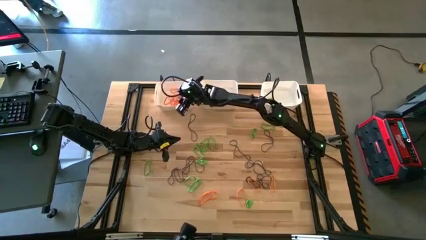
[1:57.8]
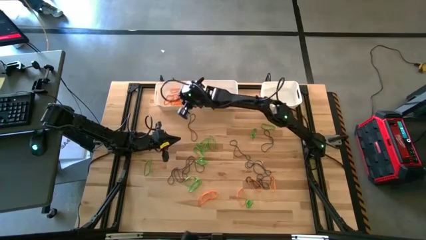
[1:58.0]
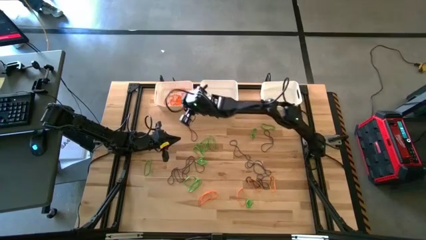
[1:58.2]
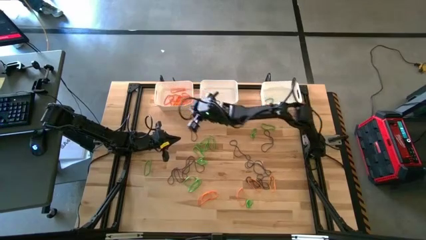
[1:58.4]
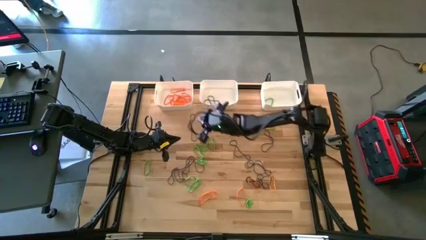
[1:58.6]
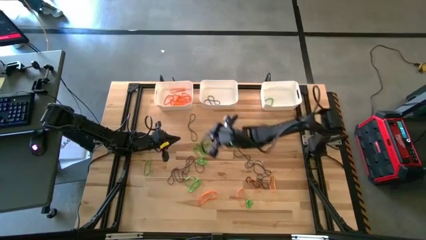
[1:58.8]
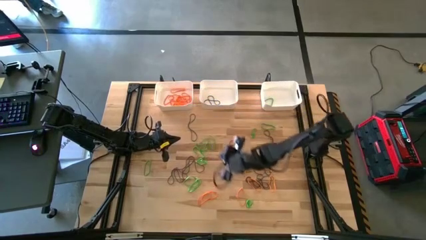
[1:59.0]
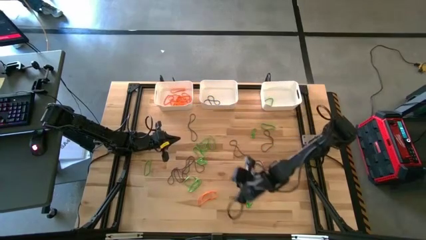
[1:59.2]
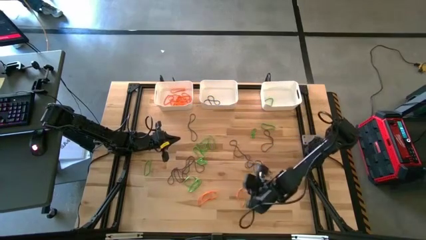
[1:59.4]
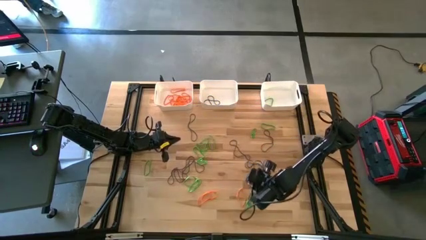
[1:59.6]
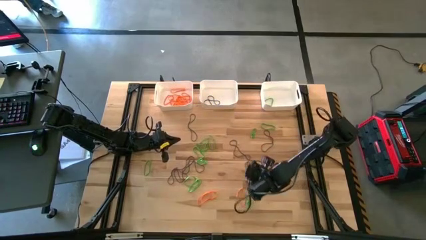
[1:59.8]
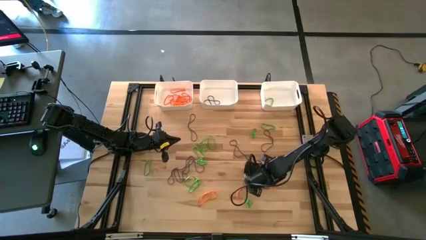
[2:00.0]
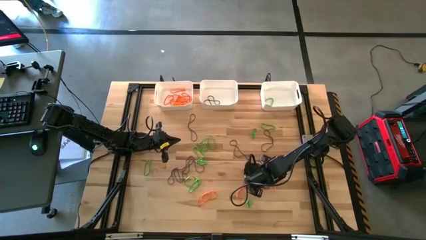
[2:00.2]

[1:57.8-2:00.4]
Task: Sort rubber bands into baskets
Put the orange rubber band into the left white bin

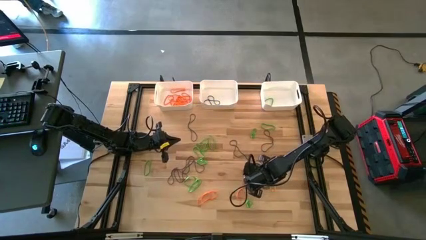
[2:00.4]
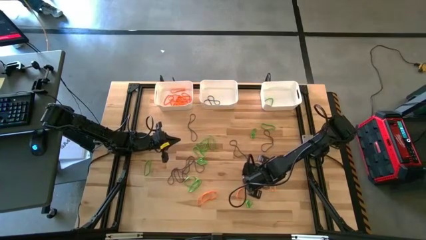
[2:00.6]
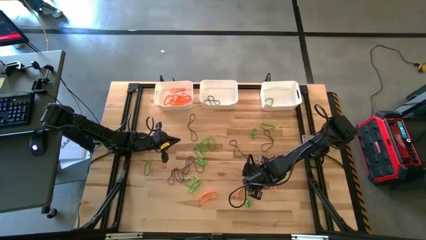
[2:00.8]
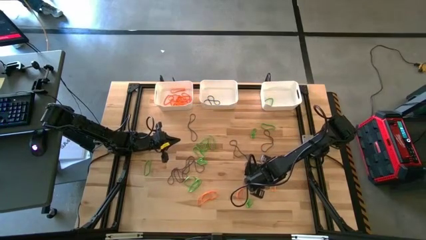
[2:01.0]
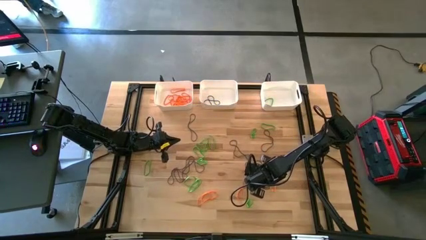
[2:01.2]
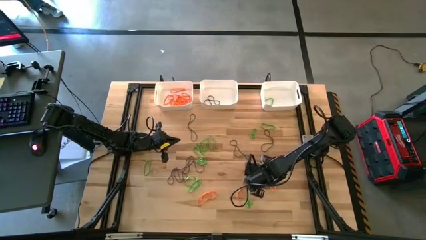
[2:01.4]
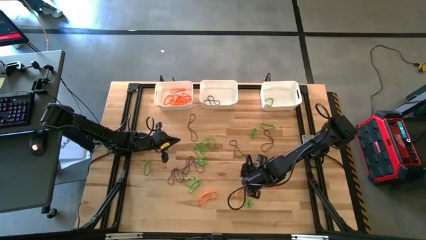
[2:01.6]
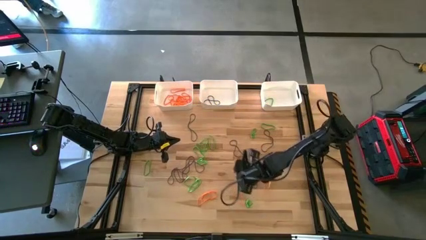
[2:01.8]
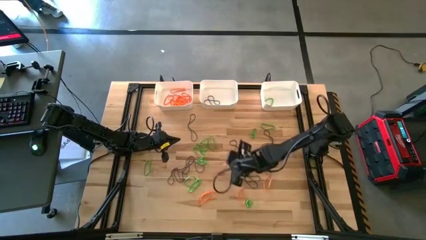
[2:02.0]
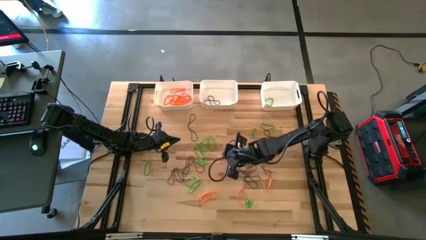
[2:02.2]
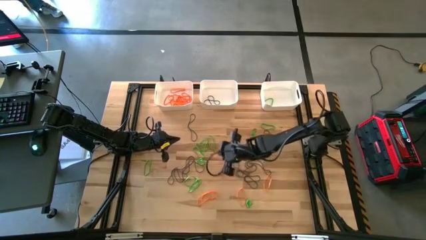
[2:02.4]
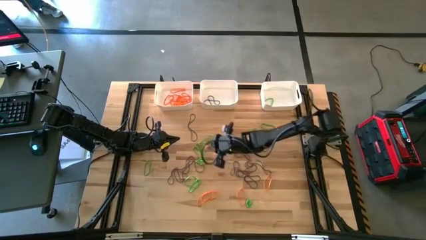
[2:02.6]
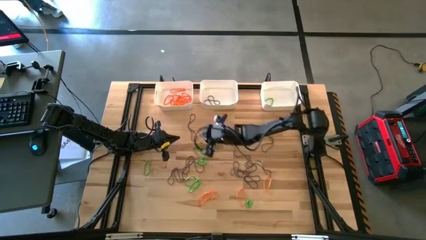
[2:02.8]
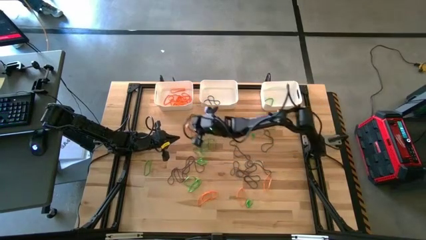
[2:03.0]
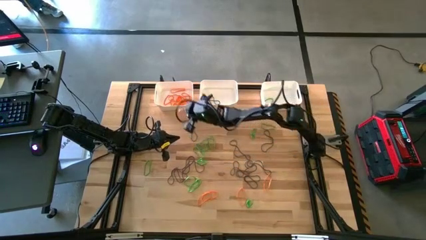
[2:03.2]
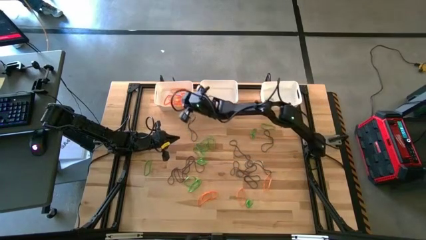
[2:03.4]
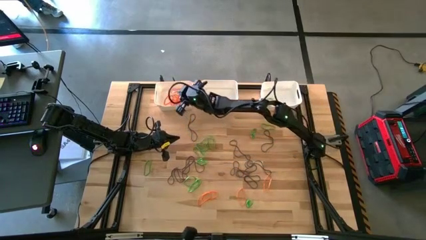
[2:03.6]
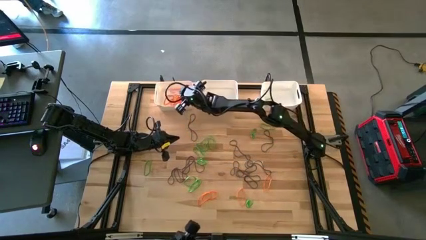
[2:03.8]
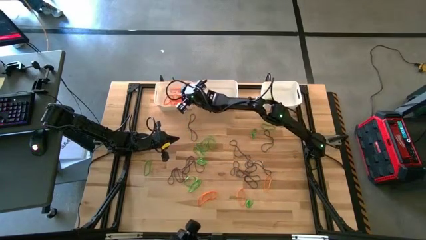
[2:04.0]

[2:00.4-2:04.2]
Put the orange rubber band into the left white bin

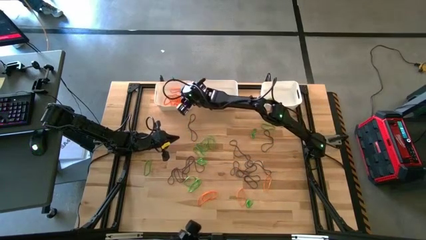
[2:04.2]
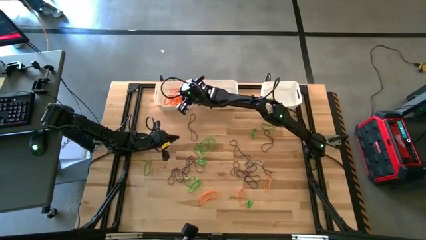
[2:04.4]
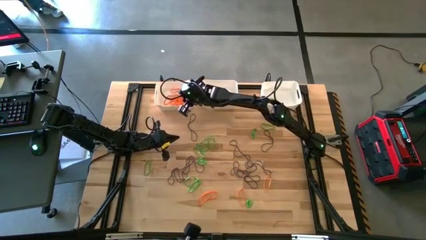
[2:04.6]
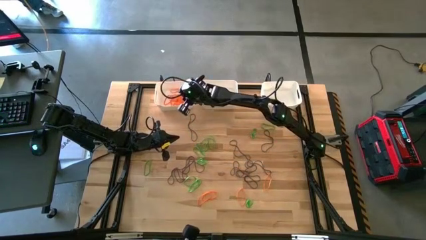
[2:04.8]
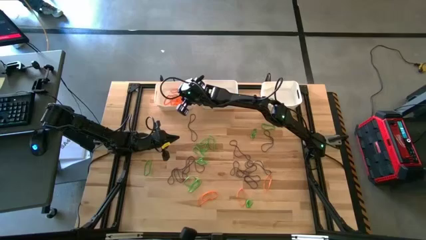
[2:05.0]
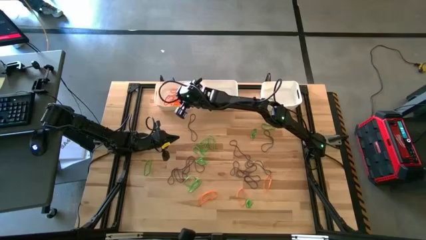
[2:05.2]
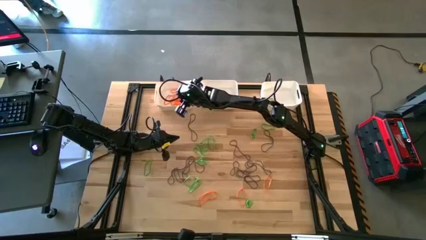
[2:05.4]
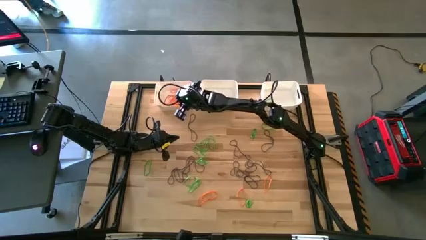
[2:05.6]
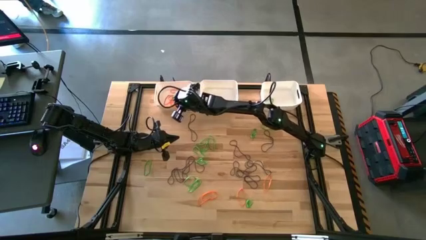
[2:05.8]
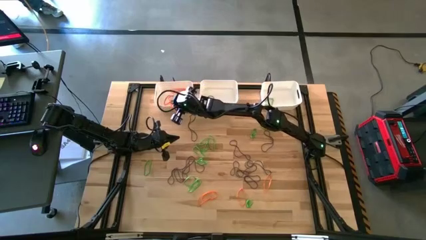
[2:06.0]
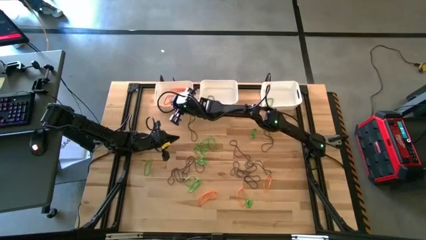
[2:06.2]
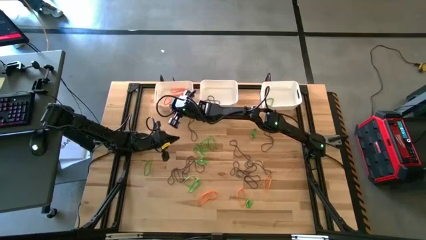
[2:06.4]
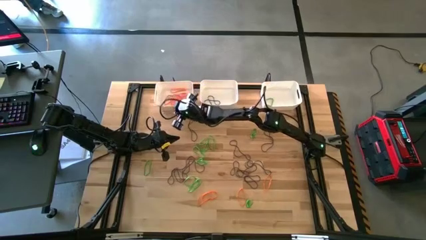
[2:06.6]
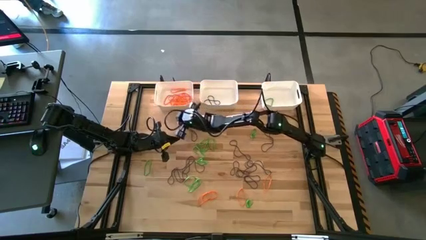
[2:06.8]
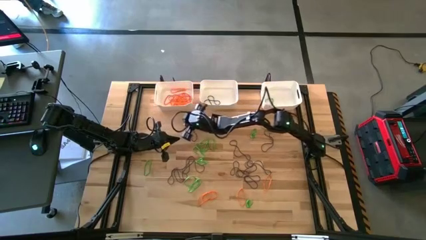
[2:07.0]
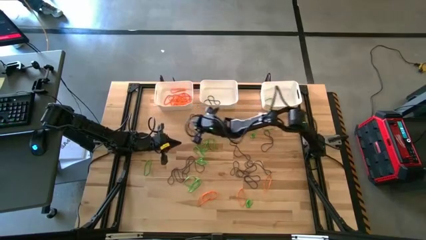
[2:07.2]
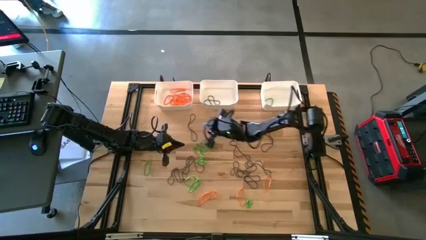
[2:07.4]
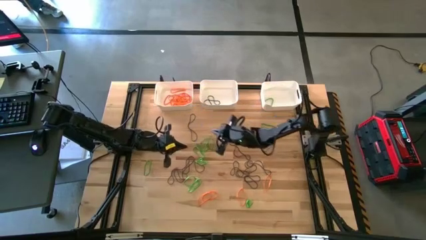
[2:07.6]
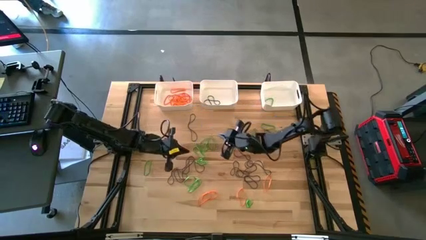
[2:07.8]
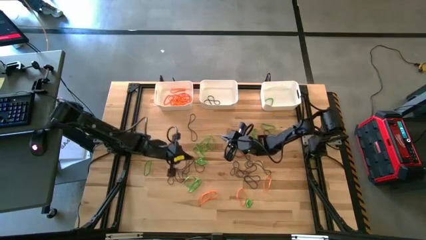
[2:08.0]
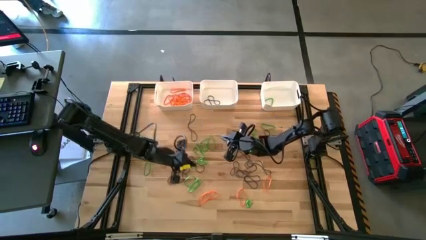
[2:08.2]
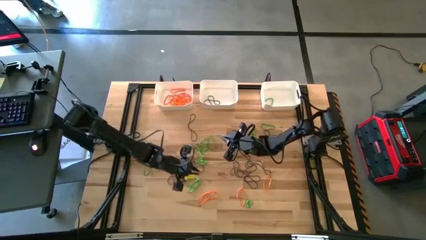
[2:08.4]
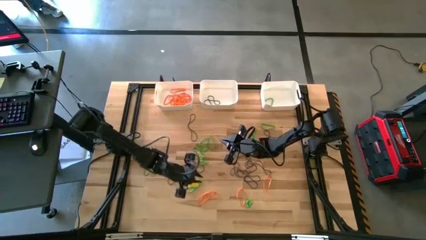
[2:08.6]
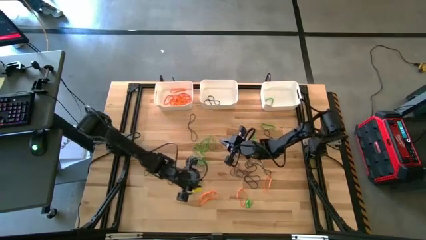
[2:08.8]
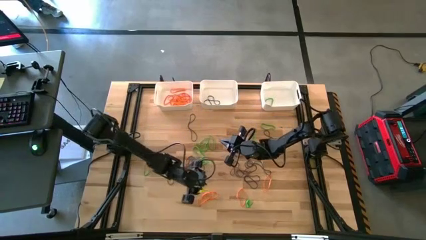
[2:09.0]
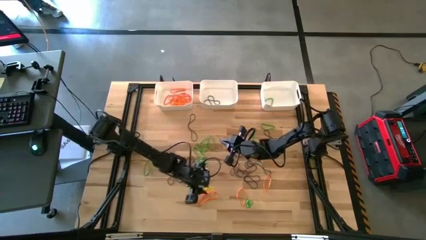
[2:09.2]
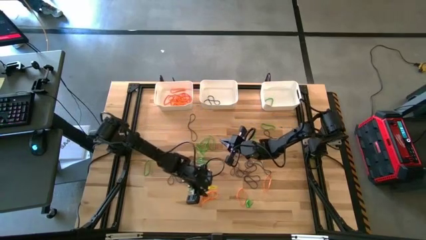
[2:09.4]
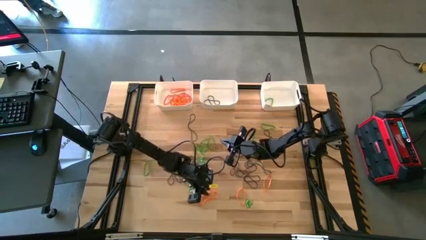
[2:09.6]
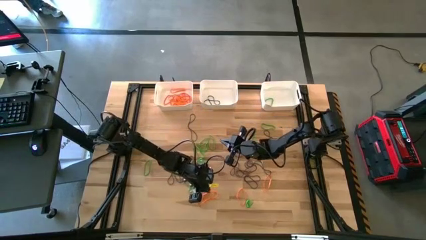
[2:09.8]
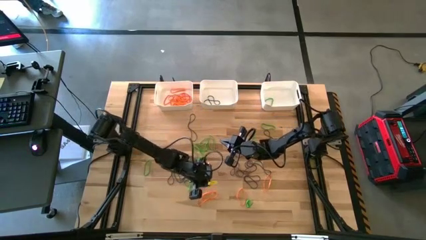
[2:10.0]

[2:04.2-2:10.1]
Put the orange rubber band into the left white bin

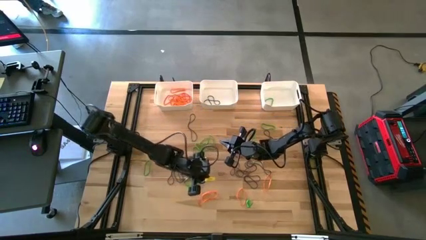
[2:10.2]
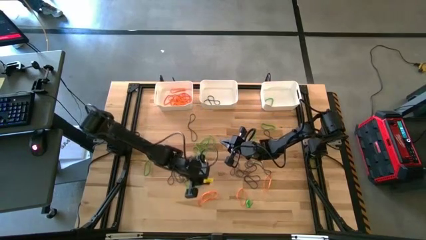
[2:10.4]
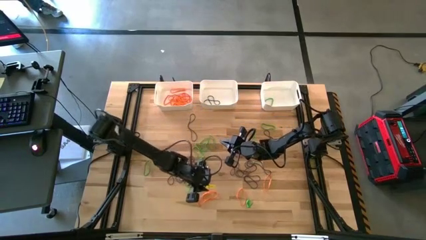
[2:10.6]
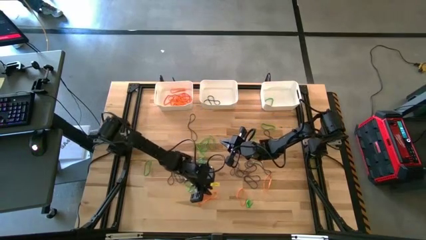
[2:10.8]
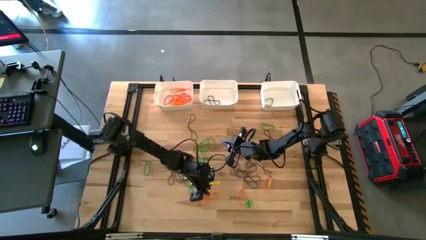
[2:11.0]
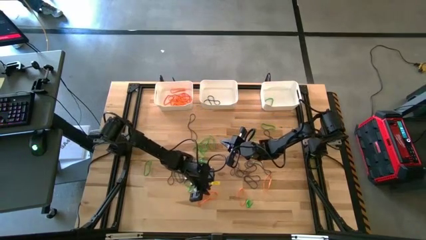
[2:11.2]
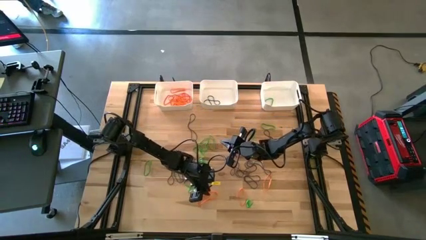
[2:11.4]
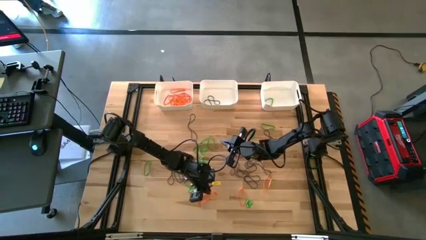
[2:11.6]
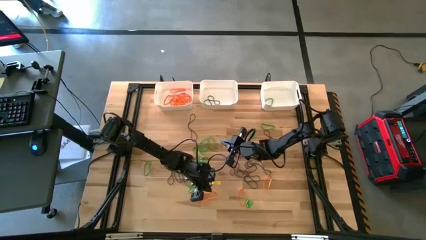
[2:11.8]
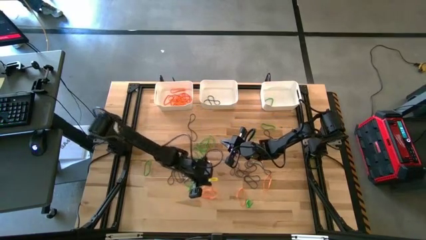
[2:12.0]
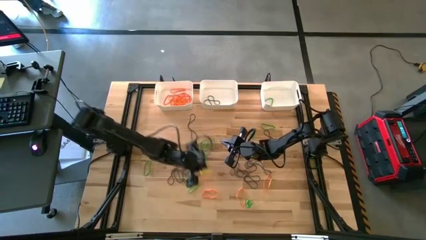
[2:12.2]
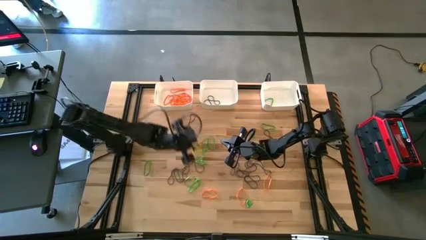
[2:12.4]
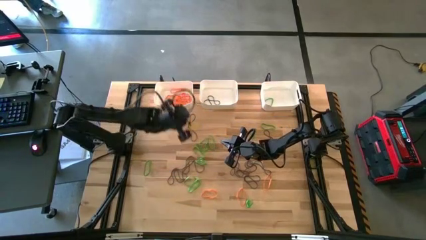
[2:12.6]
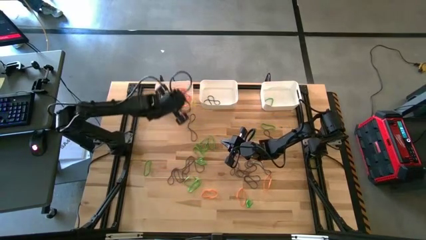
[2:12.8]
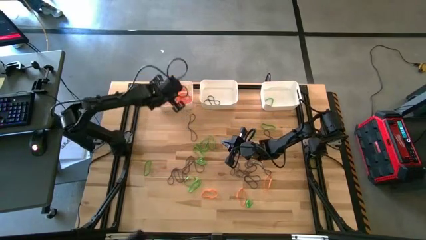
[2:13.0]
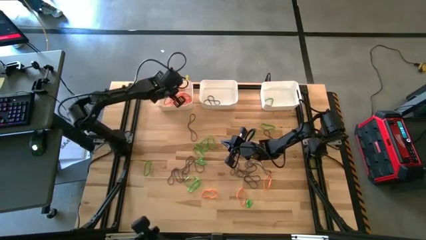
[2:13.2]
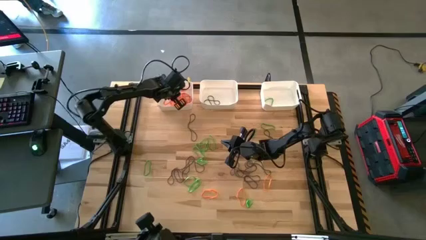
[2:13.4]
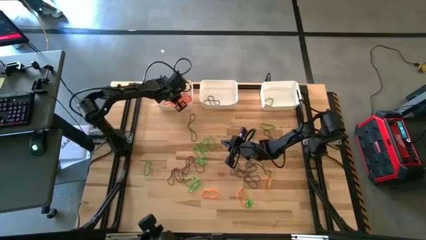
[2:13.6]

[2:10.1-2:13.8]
Put the orange rubber band into the left white bin
